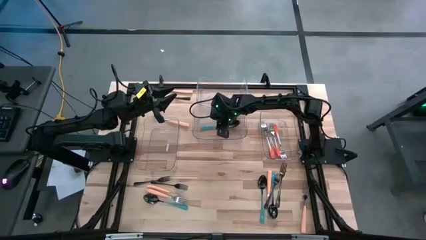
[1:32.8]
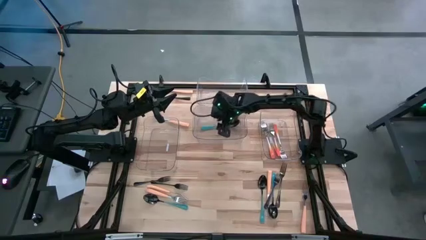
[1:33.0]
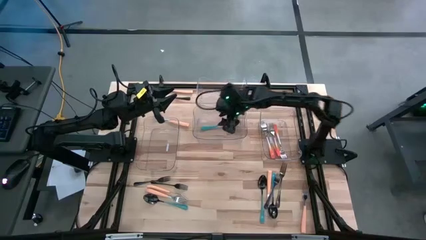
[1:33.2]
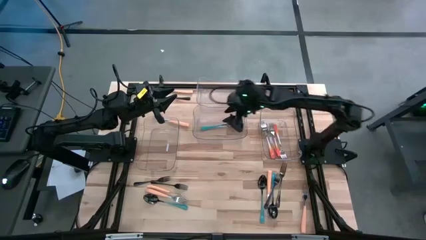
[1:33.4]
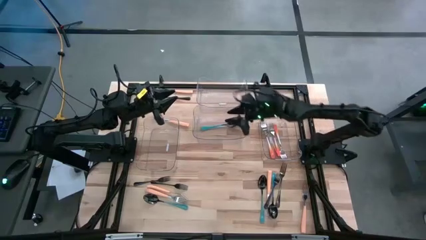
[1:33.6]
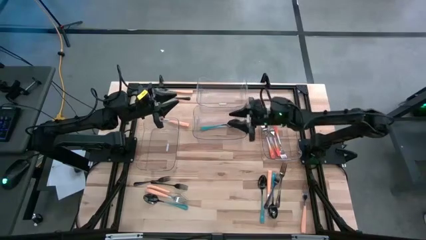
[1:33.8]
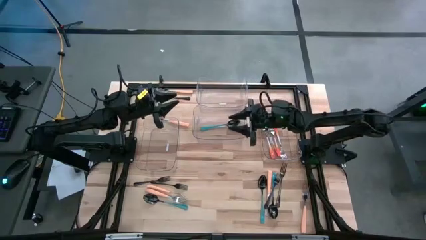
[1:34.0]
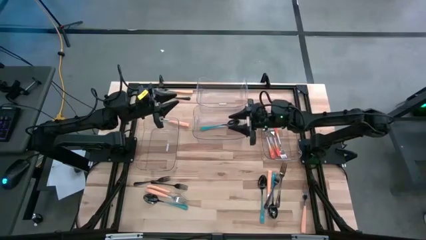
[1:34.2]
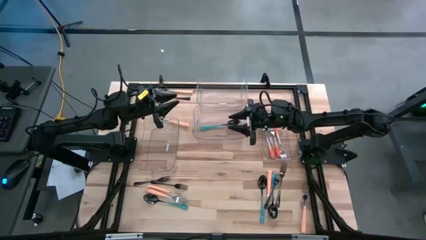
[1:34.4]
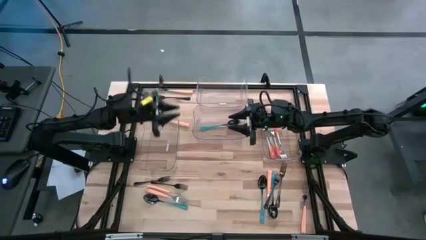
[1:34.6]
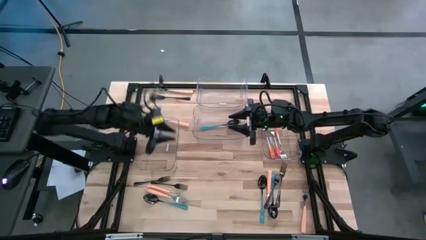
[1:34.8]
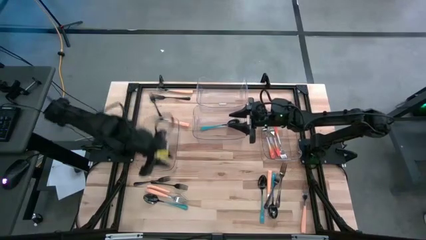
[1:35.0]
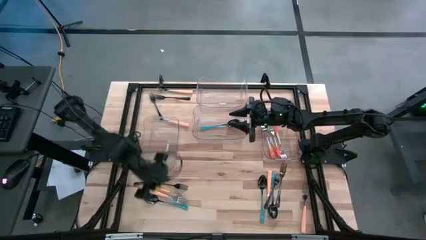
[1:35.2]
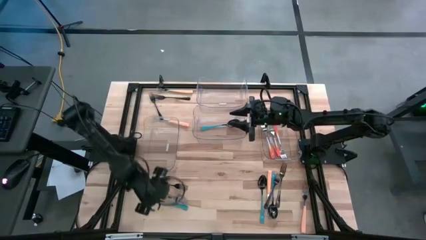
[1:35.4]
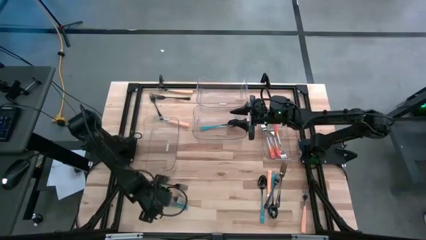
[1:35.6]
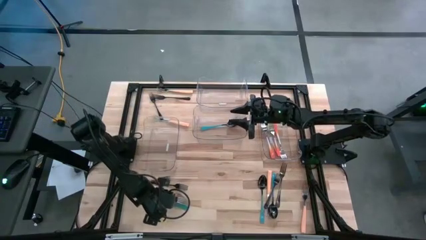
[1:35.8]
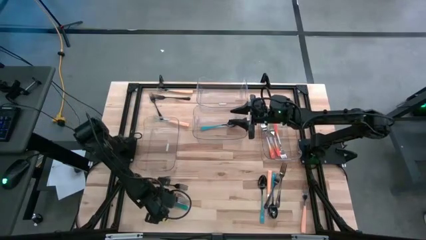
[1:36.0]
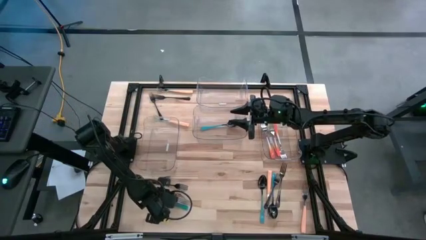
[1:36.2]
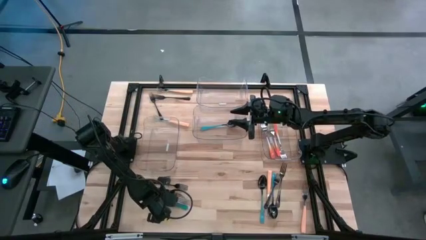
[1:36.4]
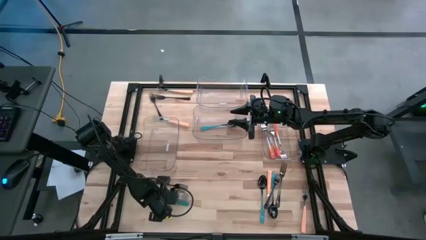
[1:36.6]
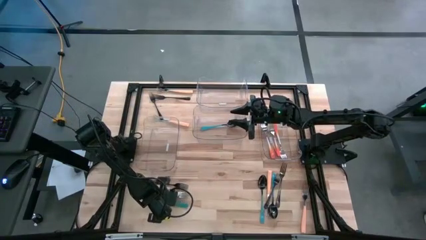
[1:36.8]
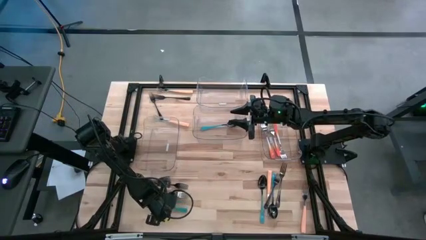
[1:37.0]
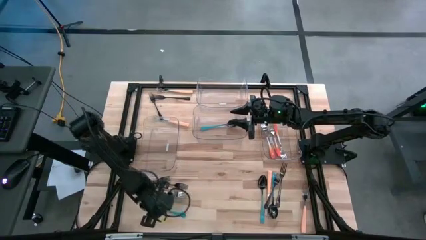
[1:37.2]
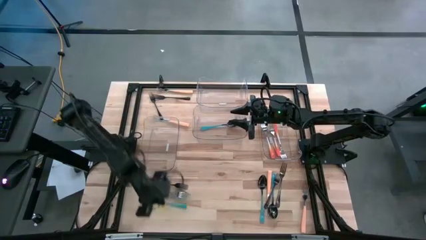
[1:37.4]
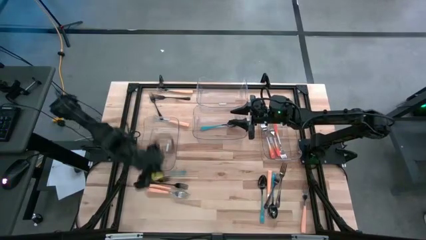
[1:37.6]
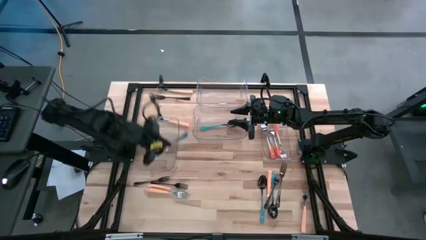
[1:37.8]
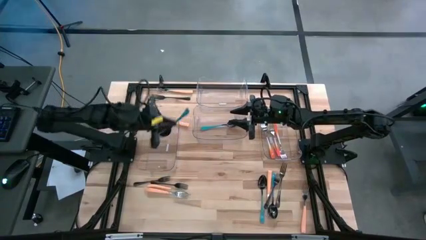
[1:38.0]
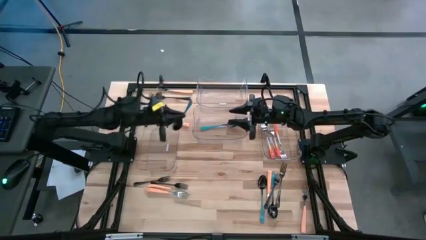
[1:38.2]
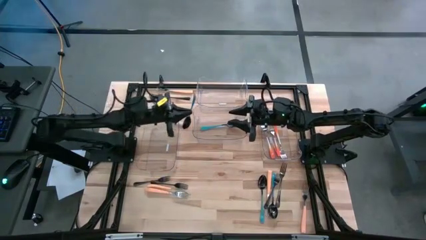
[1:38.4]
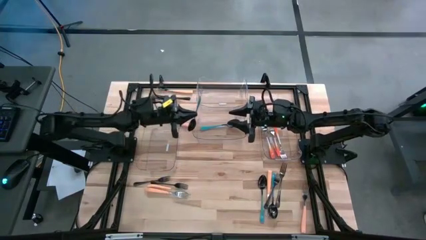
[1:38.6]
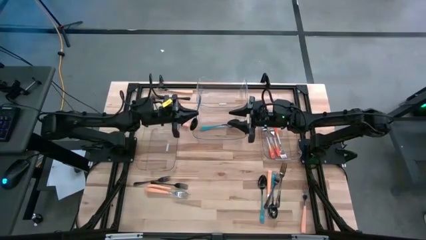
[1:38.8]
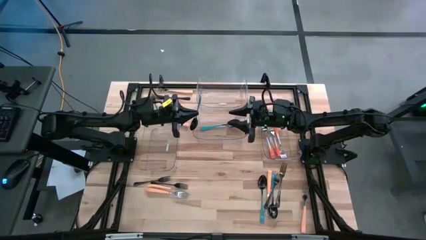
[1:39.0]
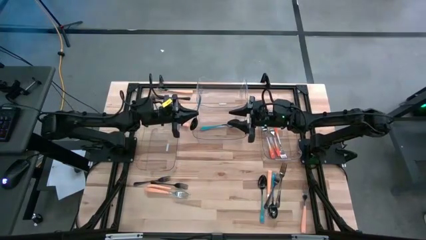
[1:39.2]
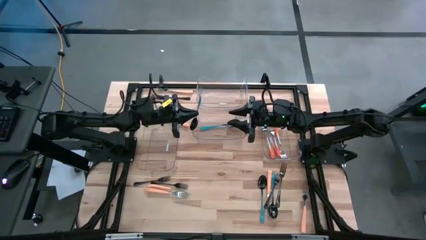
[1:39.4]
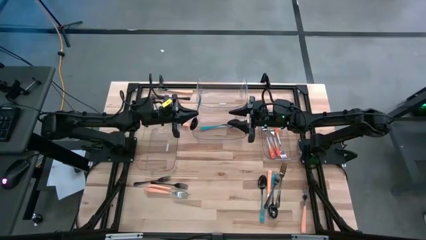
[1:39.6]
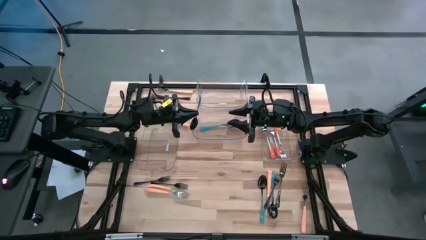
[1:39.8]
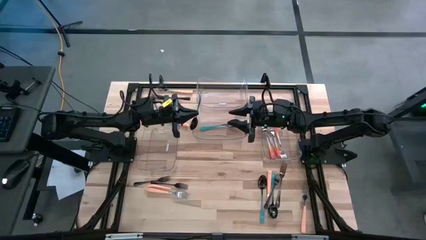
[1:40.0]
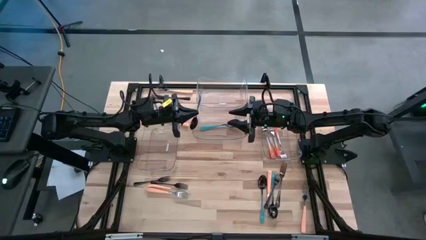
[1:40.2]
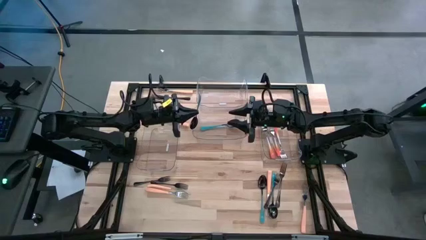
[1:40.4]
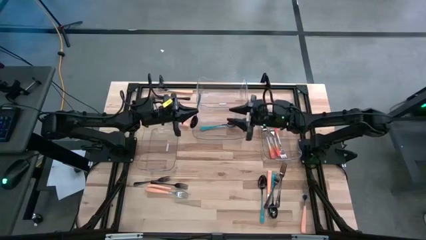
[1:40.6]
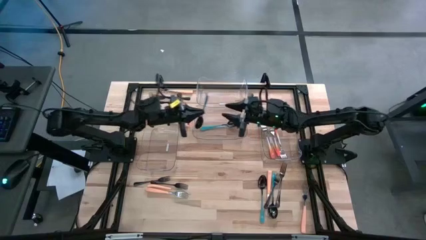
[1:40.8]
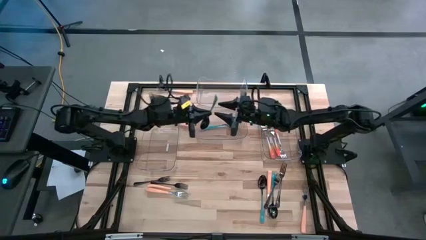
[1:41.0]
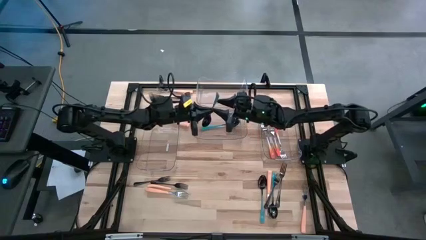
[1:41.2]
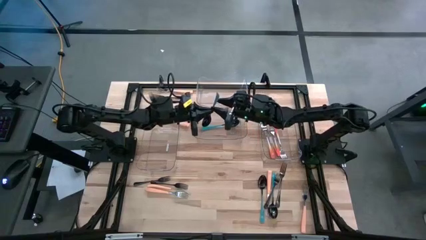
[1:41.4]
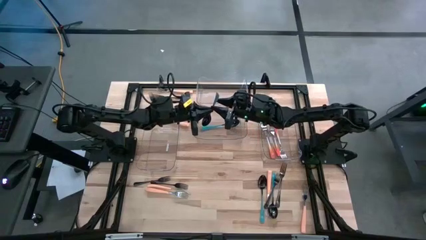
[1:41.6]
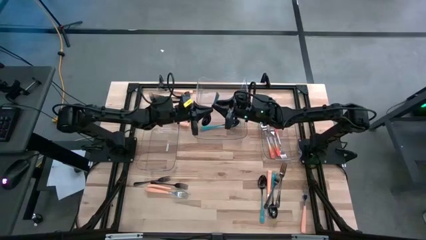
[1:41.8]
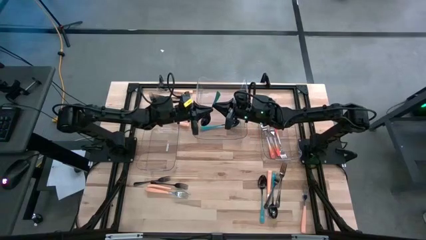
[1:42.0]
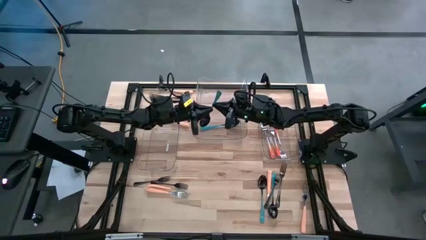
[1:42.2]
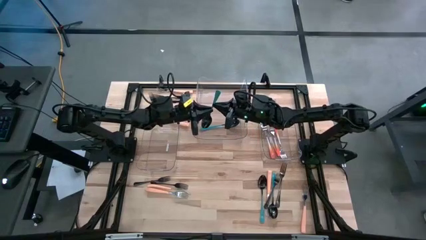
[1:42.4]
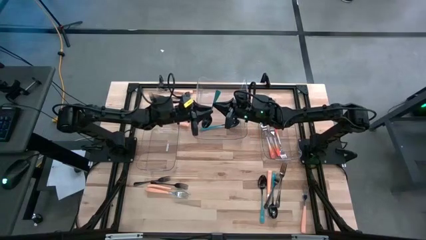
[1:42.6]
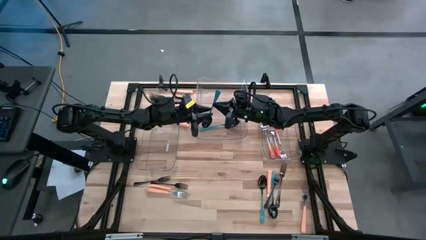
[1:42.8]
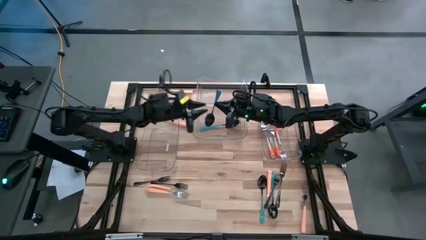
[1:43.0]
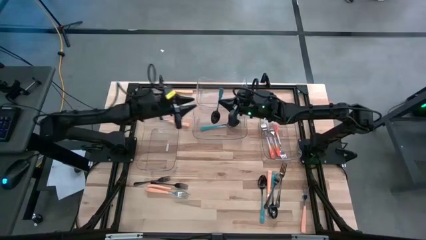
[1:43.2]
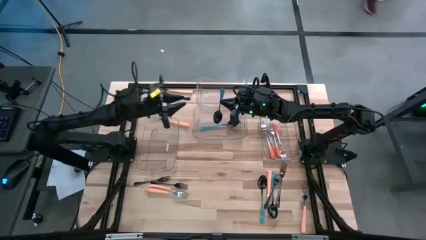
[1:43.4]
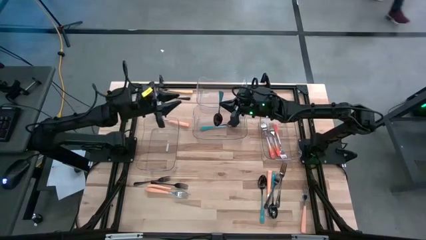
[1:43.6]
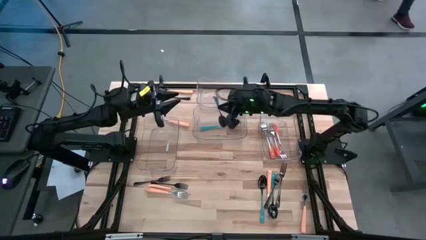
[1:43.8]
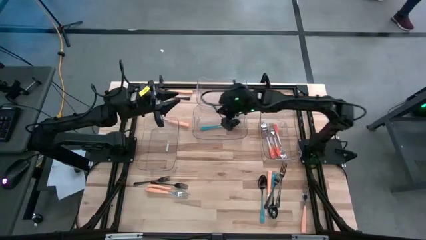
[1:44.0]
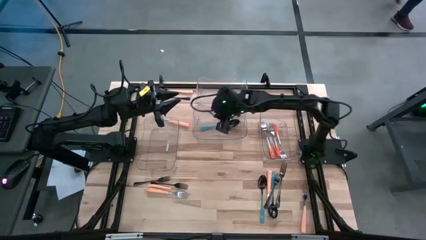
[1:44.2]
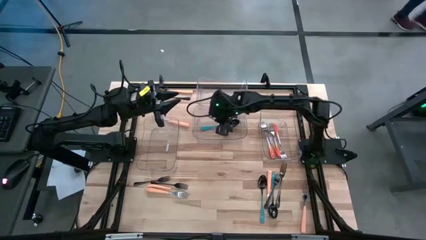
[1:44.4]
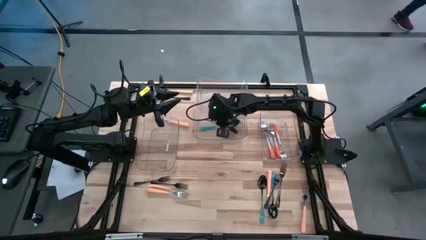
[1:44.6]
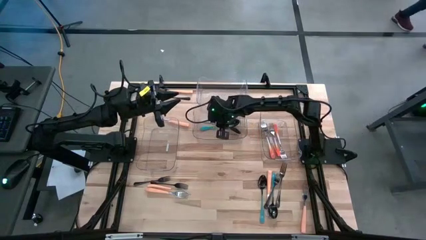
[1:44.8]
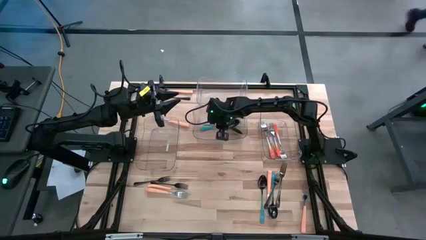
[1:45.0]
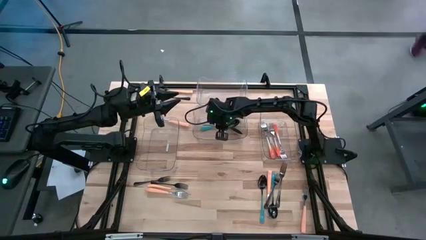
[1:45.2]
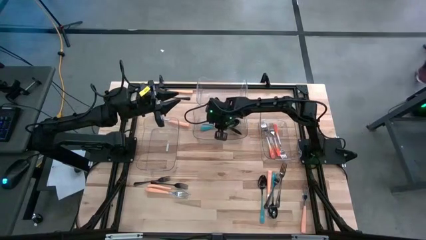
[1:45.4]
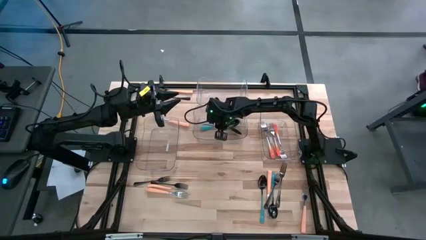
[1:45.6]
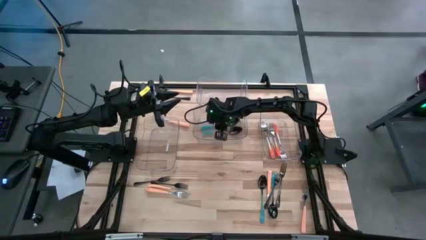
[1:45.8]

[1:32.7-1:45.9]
Task: Sort silverware by color (type)
Put the blue spoon into the middle transparent bin

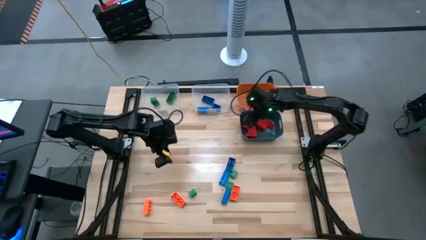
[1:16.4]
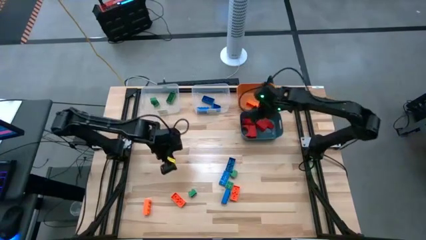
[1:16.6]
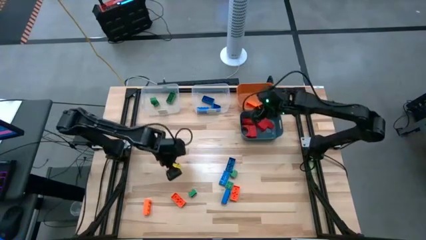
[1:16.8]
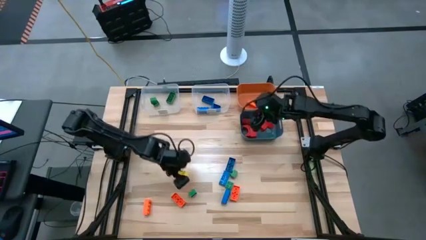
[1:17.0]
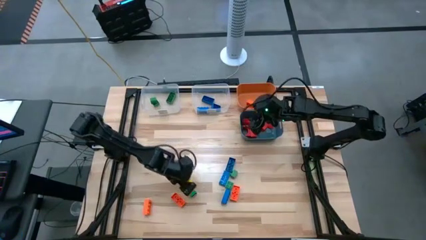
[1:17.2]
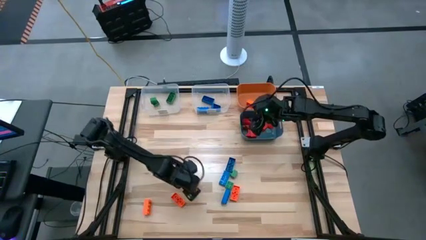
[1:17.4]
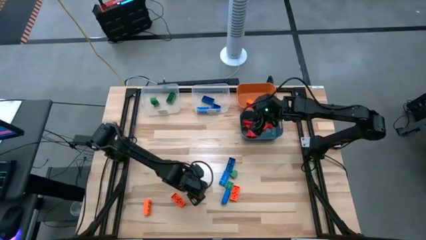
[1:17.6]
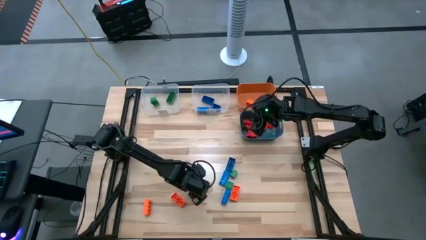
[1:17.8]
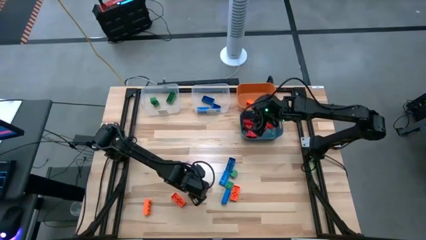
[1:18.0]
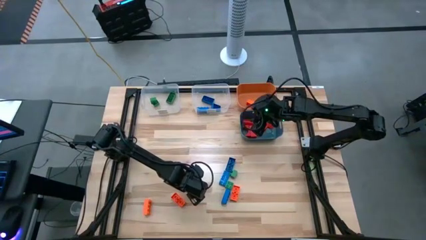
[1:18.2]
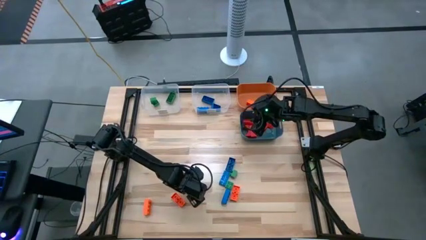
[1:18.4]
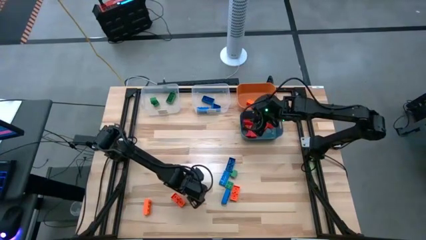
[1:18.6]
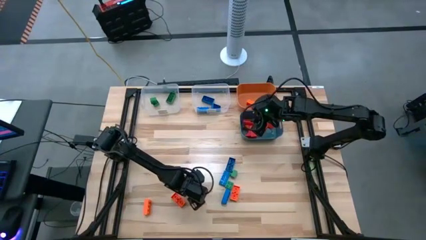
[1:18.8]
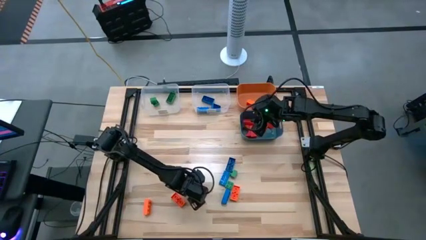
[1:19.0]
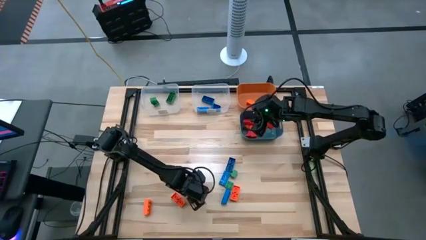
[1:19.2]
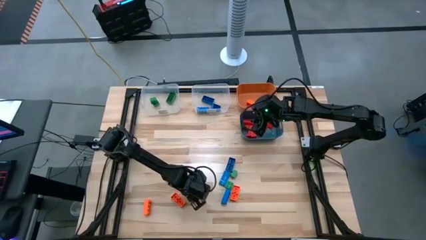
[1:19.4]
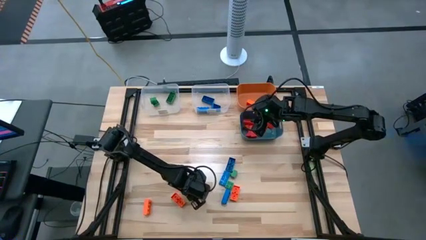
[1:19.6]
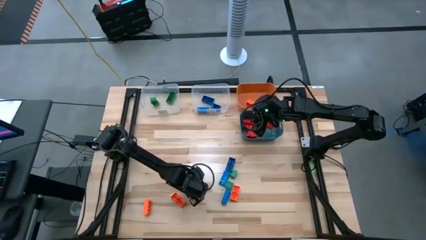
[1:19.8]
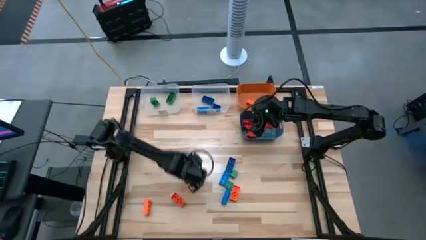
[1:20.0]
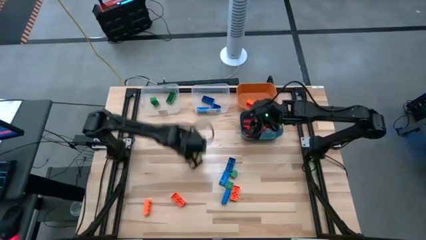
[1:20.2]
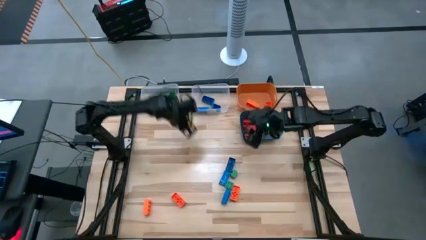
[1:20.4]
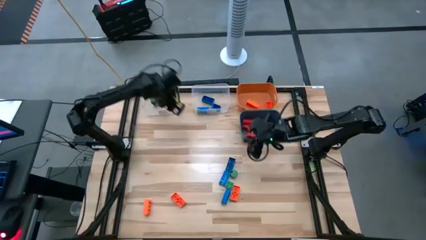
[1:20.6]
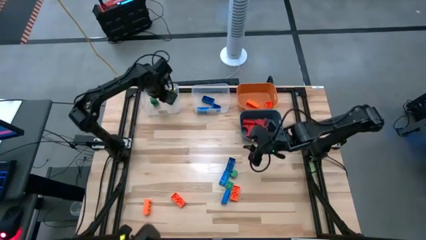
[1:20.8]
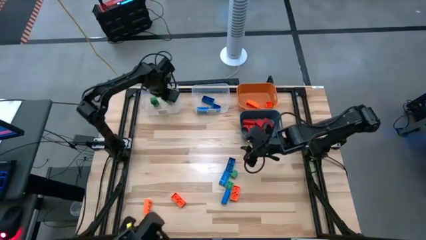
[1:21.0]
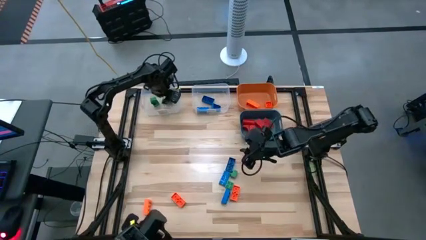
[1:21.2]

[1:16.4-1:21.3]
Task: Sort blocks
Put the green game piece into the left transparent bin
